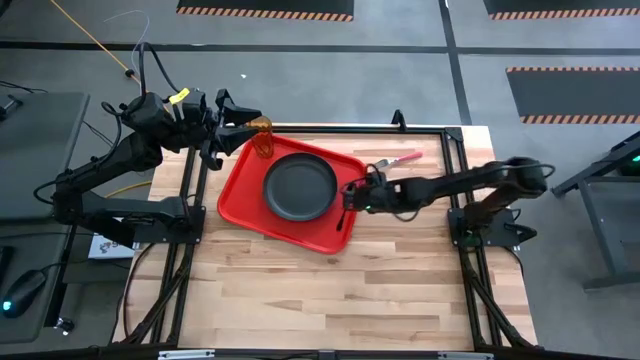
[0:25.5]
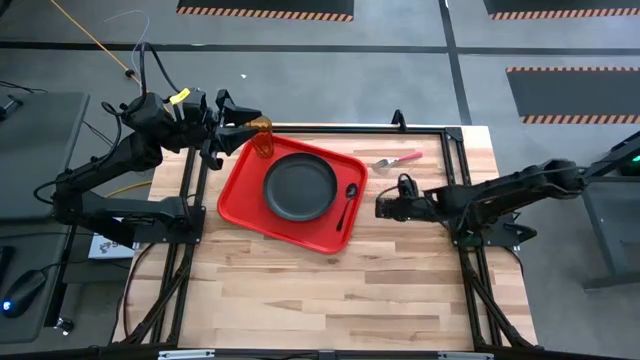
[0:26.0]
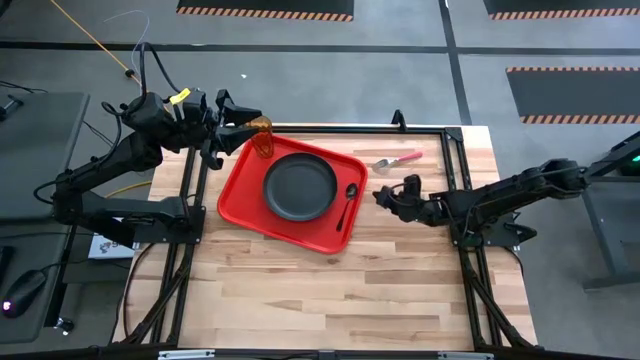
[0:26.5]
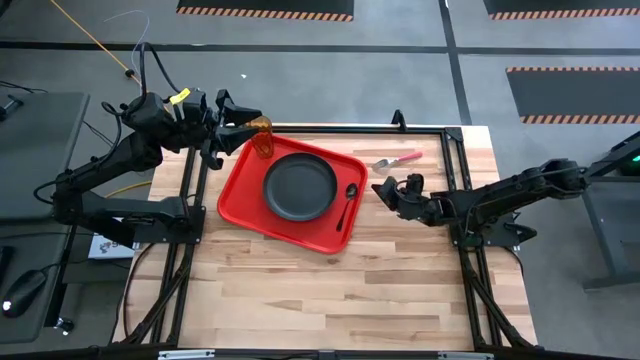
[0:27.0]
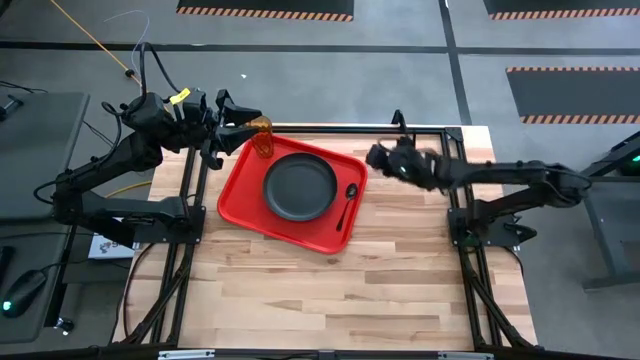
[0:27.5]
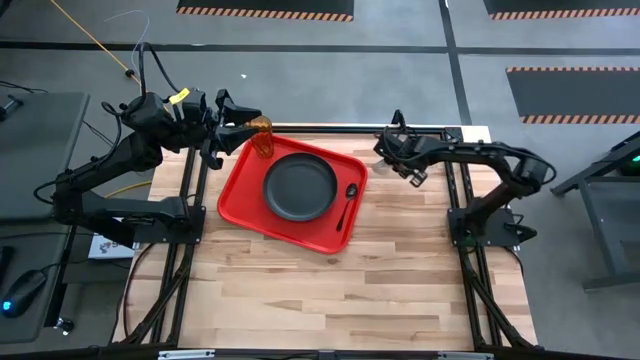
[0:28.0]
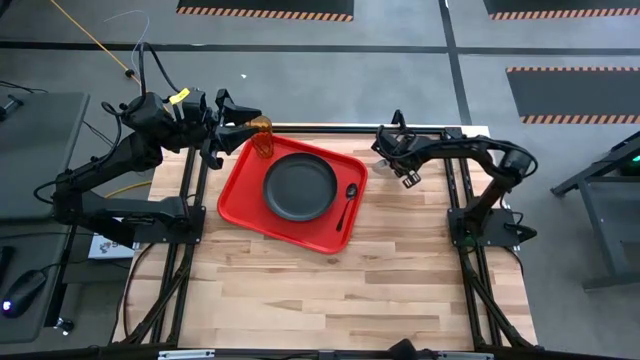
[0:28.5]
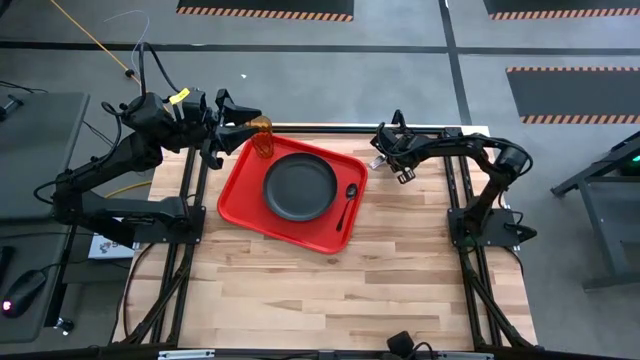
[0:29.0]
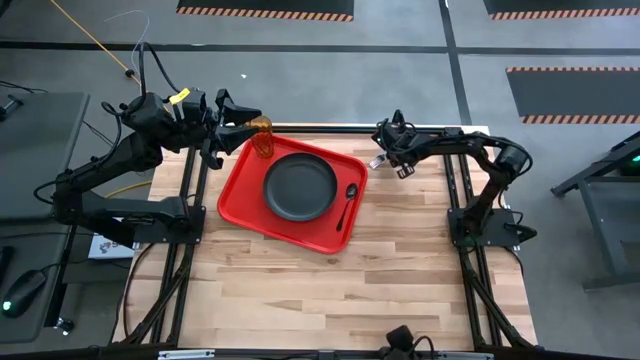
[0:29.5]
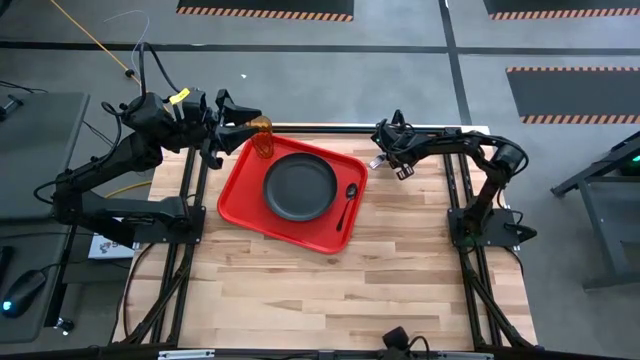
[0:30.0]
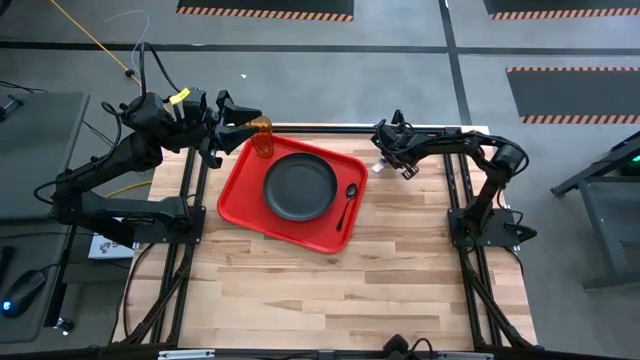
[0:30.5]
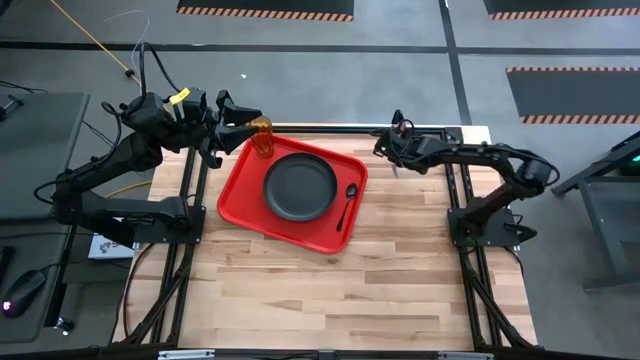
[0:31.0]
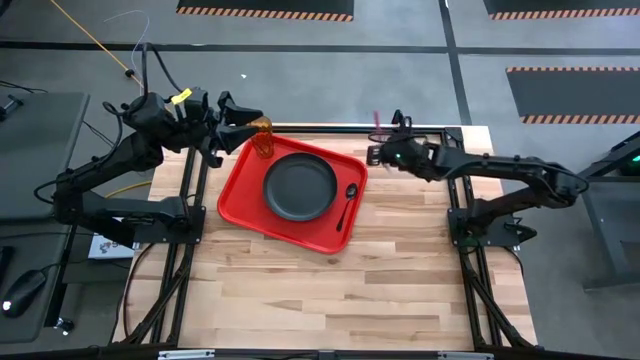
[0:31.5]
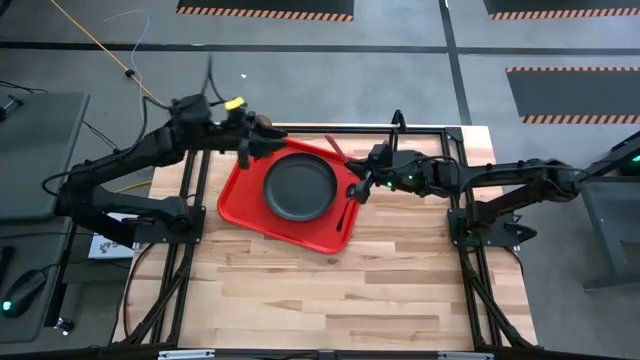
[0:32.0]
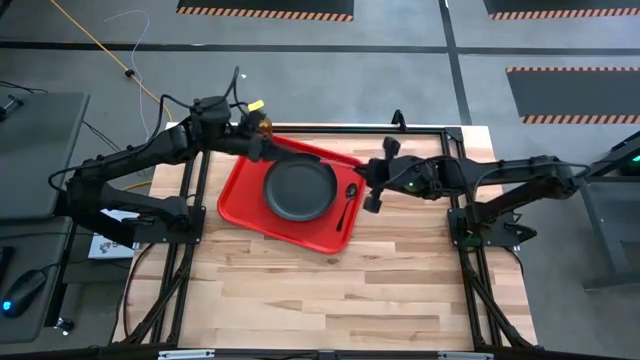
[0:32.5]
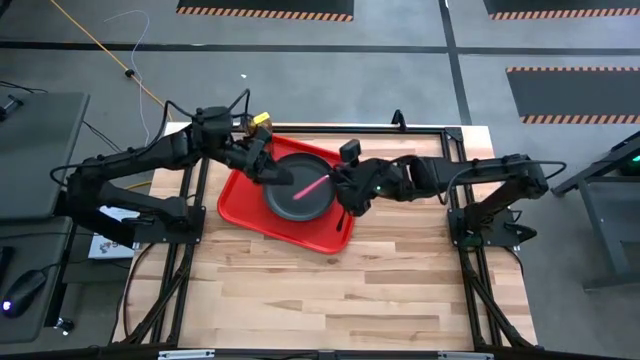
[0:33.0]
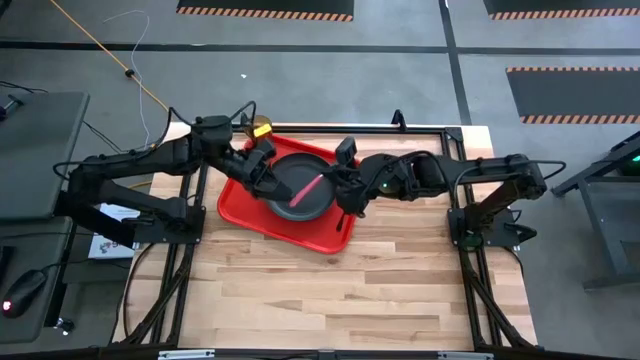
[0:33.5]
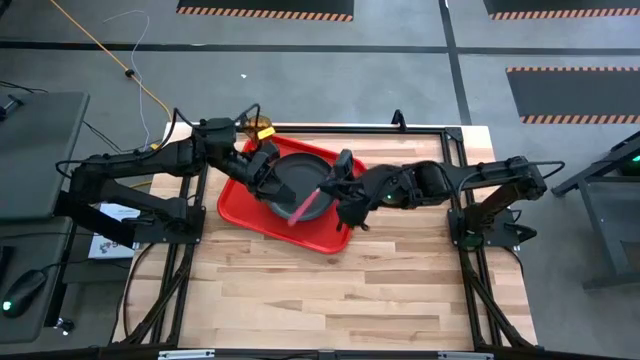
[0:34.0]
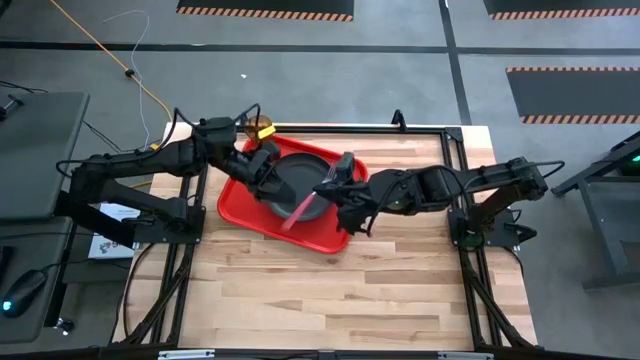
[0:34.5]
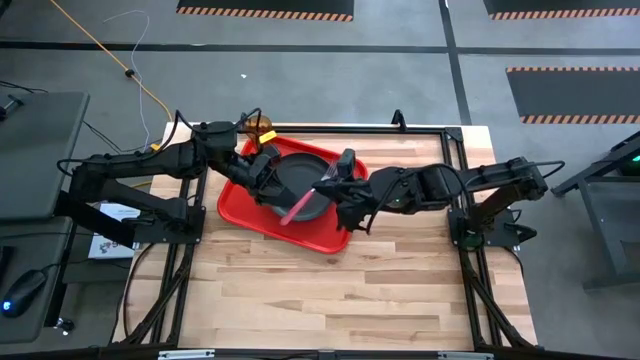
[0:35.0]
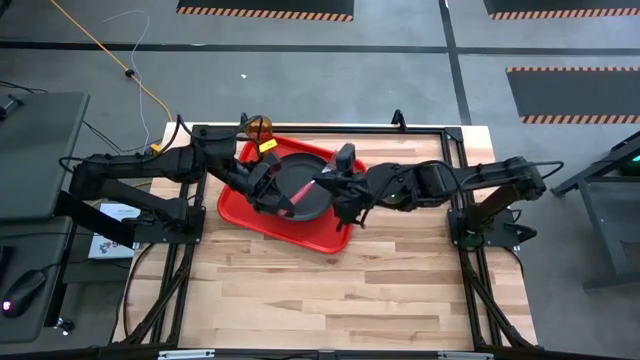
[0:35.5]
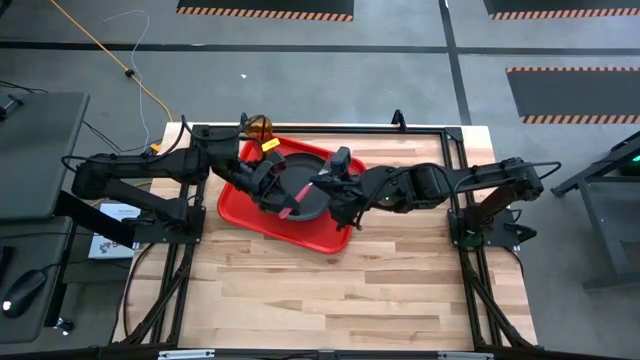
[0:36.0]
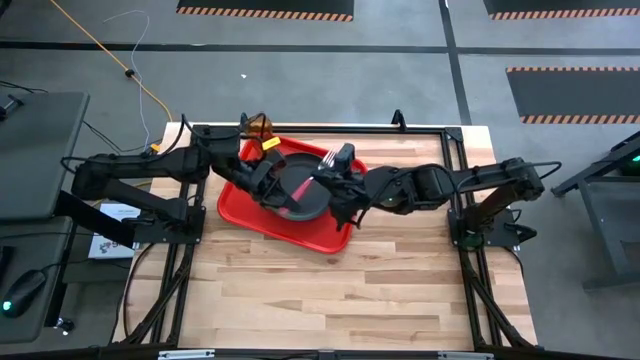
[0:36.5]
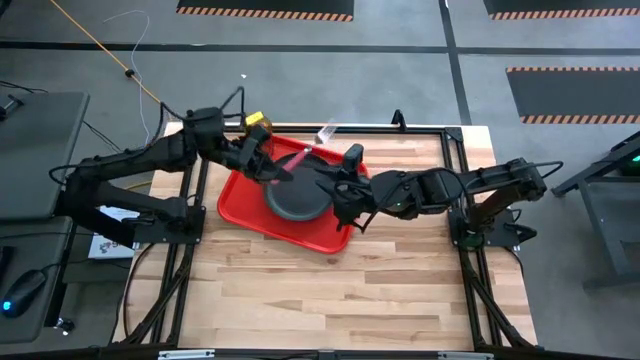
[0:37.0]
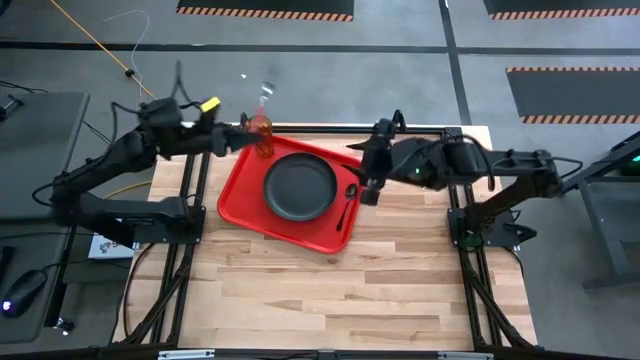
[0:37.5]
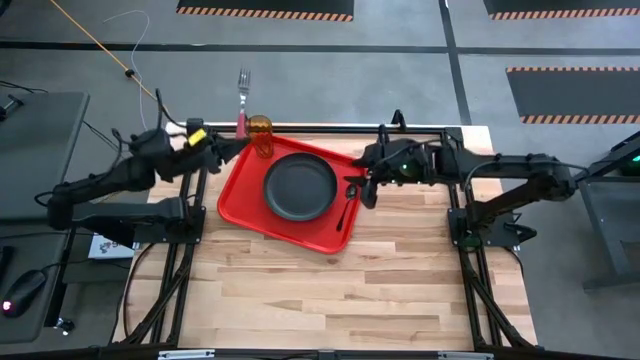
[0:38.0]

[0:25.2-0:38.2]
Task: Pick and place plate/cup/fork/spoon on tray
Put the pink fork on the red serving tray

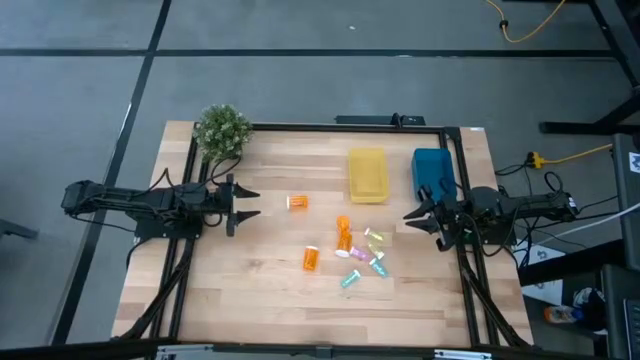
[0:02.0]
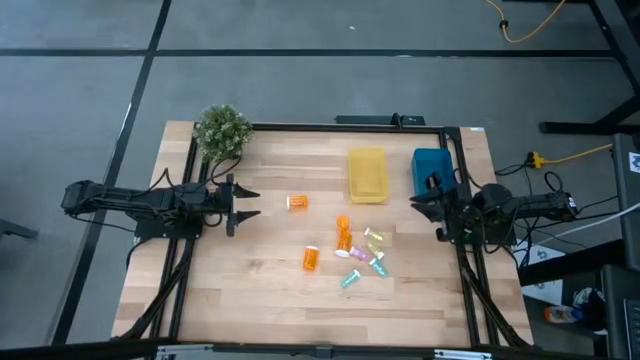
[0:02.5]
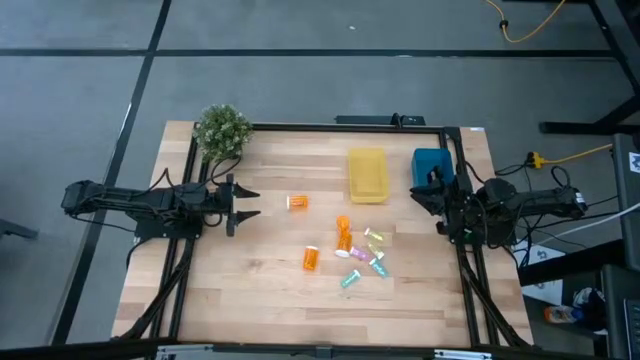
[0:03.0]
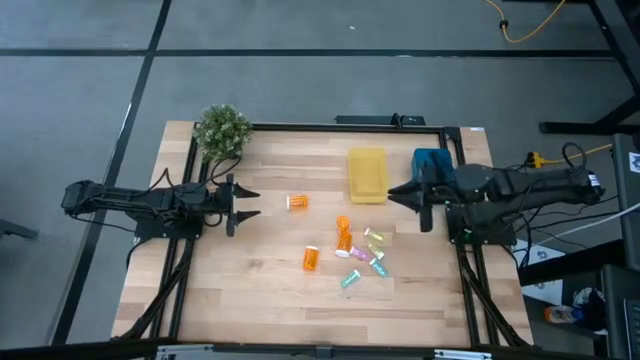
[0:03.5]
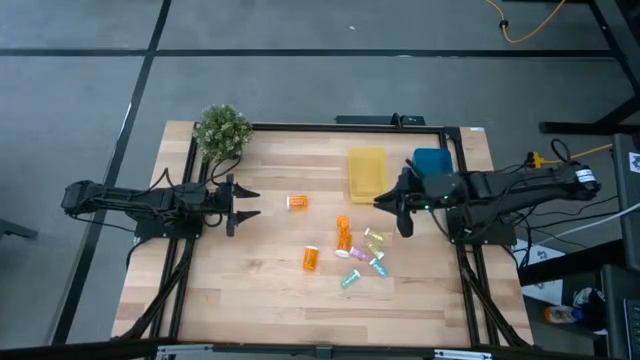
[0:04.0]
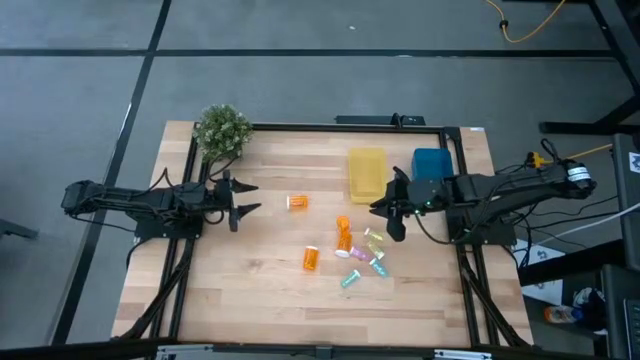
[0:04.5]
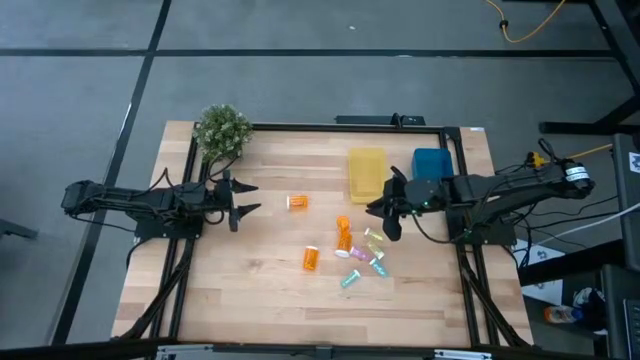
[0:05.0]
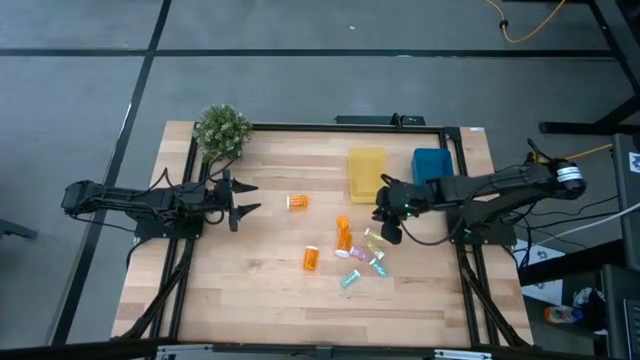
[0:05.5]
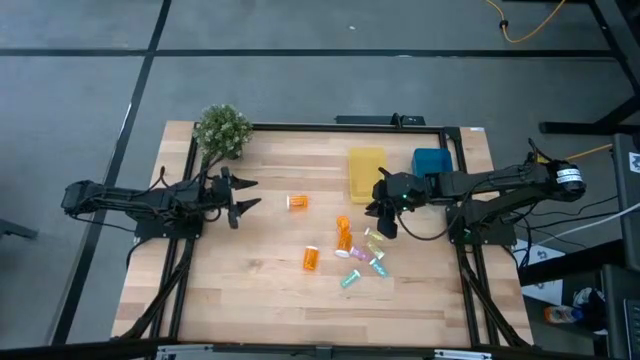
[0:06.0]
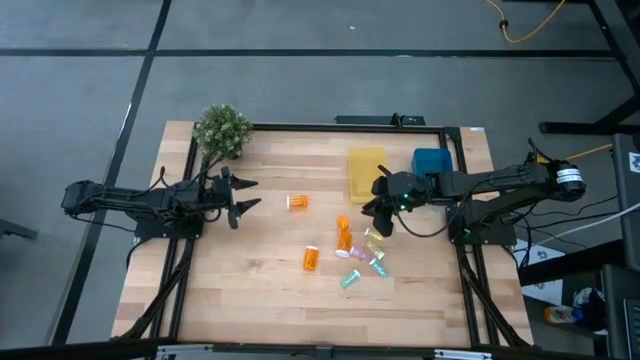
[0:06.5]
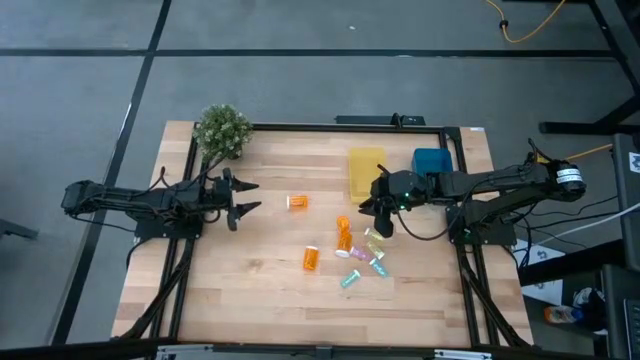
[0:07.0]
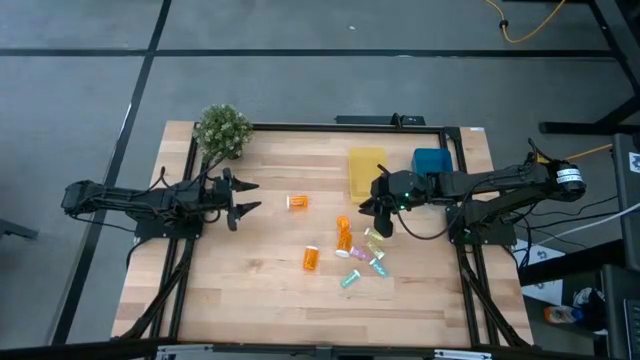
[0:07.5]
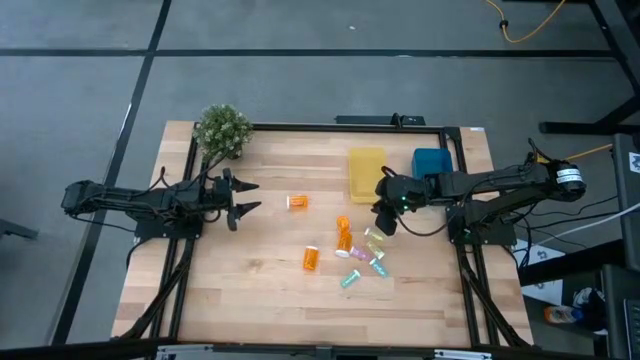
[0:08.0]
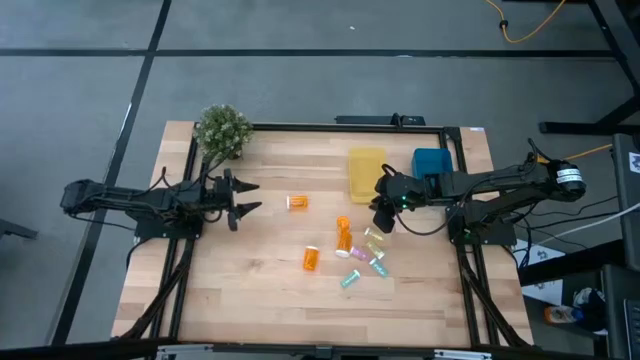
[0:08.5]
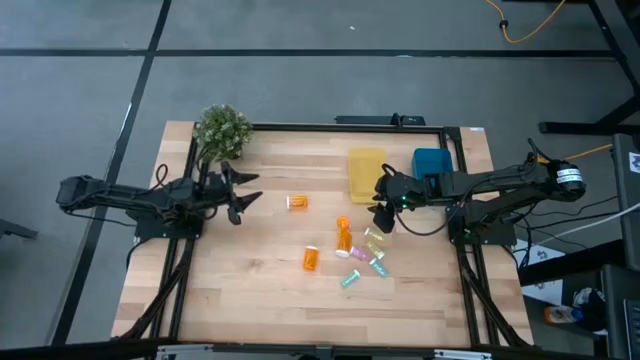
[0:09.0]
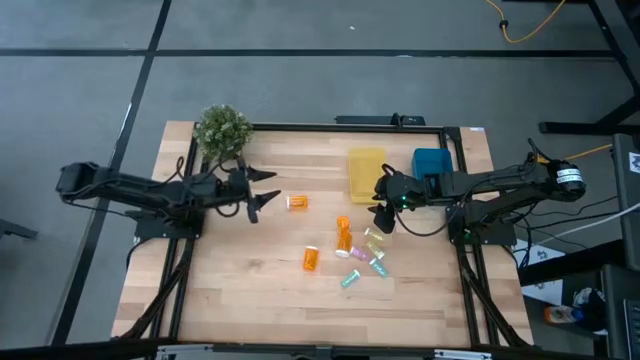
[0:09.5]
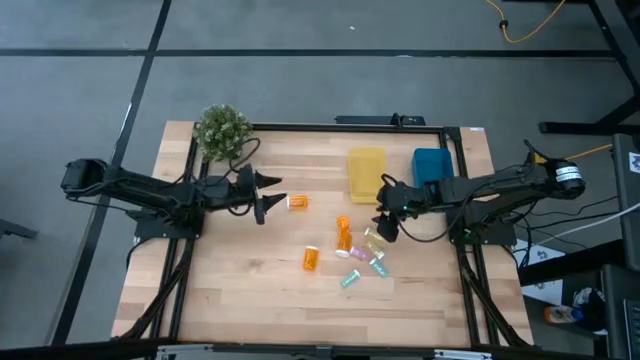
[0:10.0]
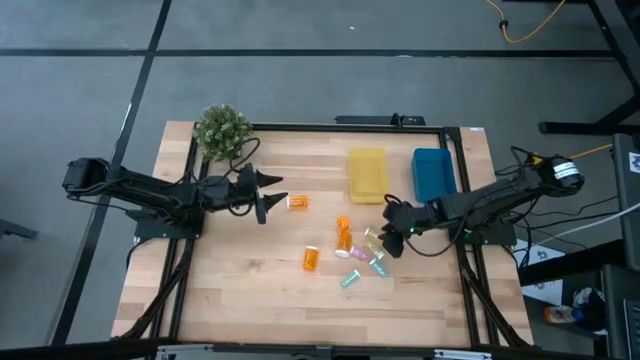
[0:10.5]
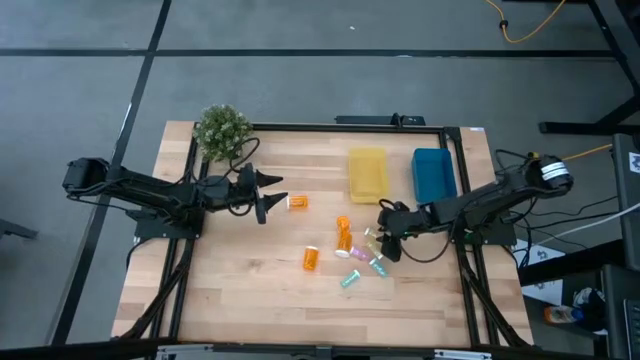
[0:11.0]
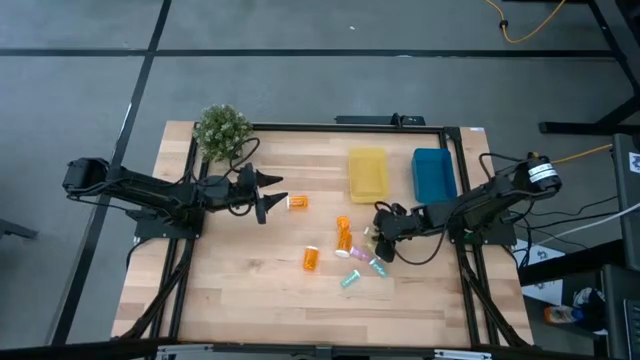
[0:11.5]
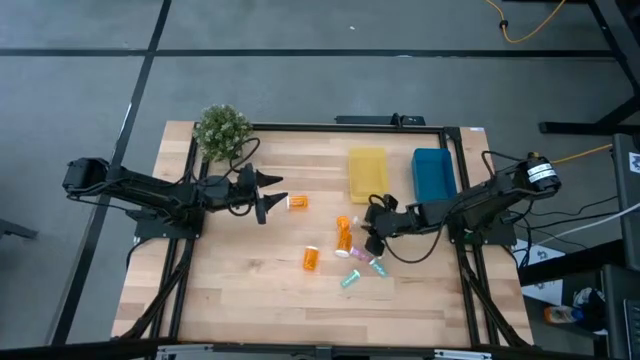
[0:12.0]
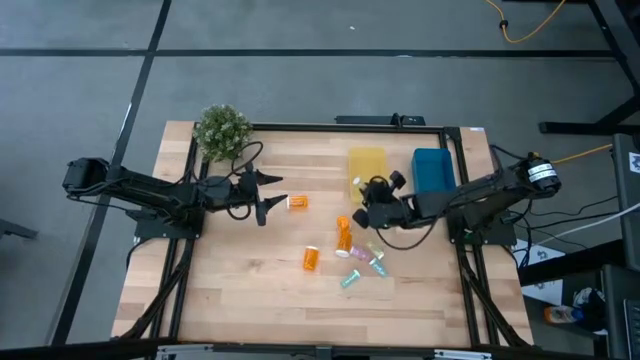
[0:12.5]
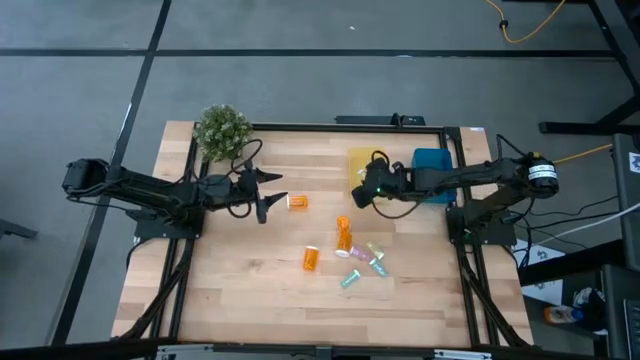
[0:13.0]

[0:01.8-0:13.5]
Task: Pick and place medicine bottles into bin by pill shape (circle, oval)
Put the small yellow pill bottle into the yellow bin
